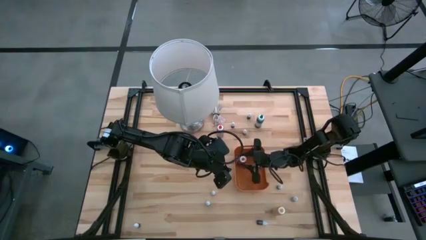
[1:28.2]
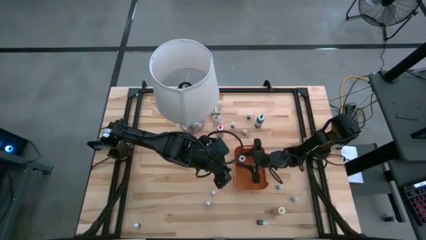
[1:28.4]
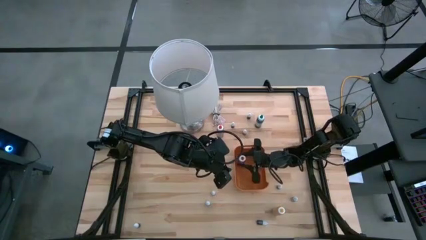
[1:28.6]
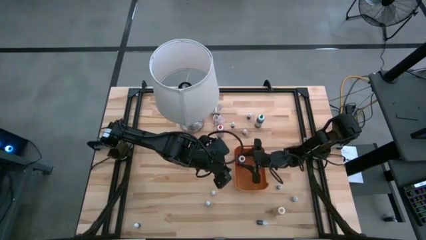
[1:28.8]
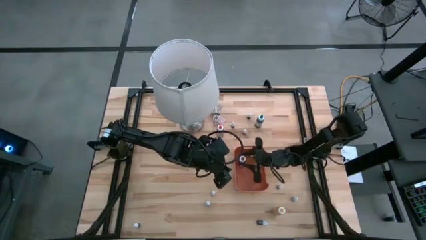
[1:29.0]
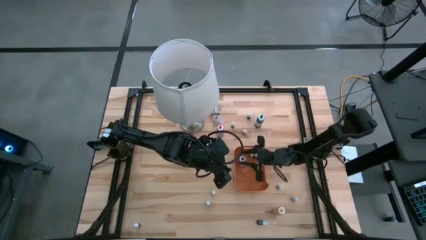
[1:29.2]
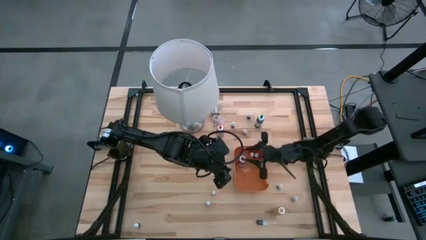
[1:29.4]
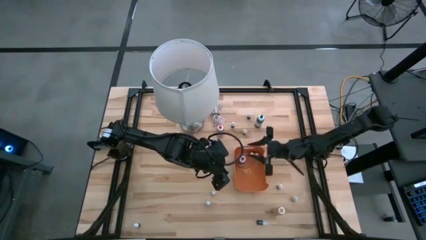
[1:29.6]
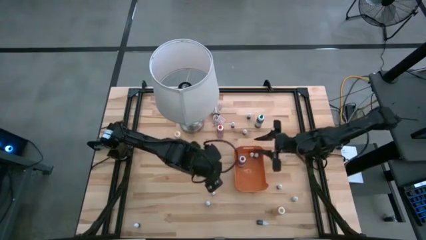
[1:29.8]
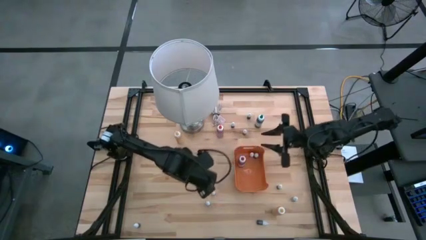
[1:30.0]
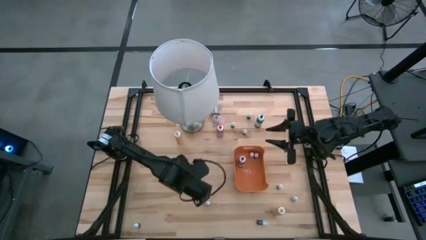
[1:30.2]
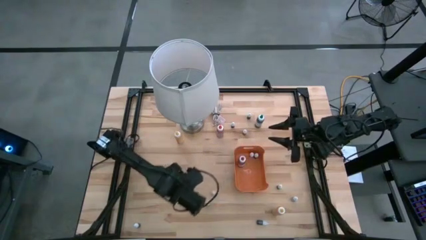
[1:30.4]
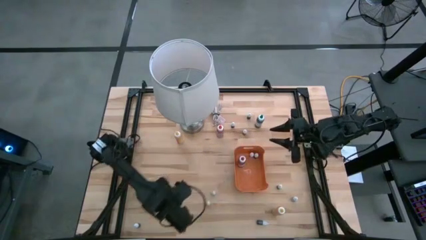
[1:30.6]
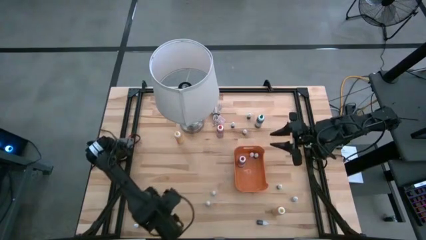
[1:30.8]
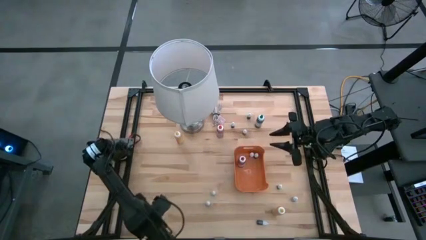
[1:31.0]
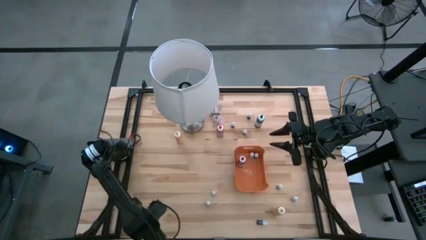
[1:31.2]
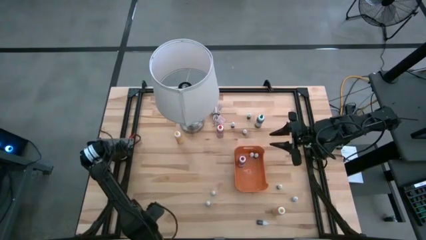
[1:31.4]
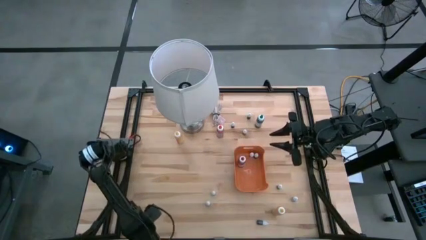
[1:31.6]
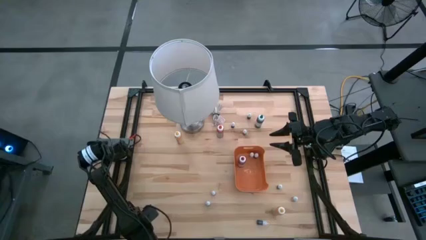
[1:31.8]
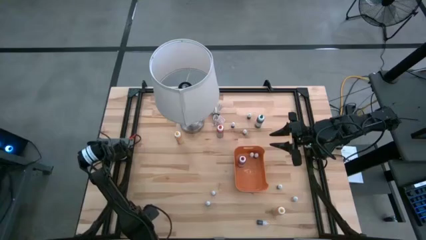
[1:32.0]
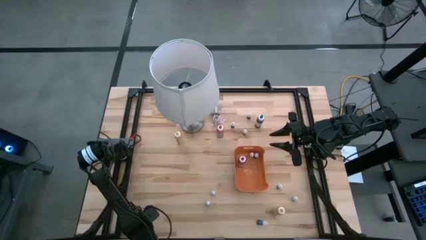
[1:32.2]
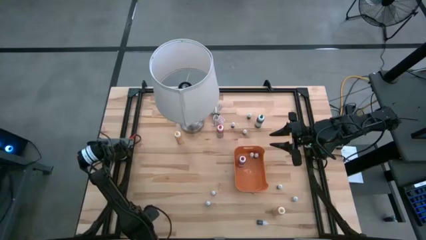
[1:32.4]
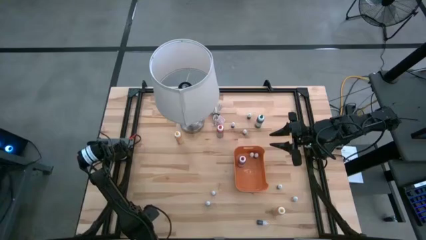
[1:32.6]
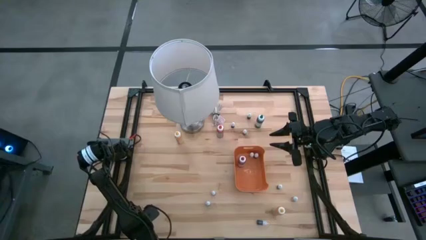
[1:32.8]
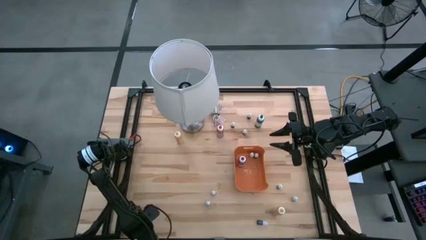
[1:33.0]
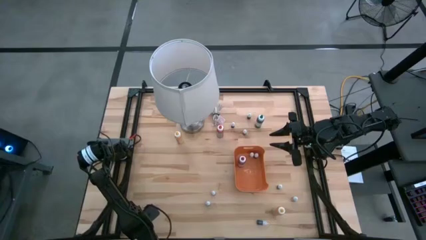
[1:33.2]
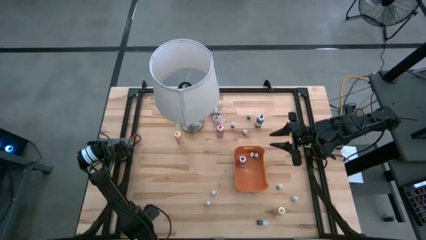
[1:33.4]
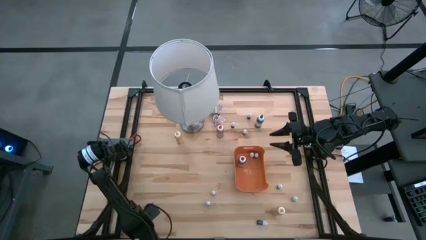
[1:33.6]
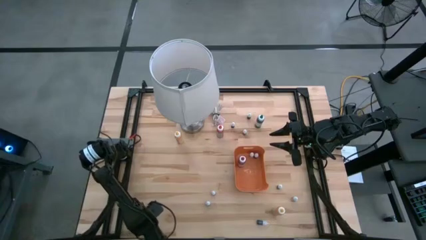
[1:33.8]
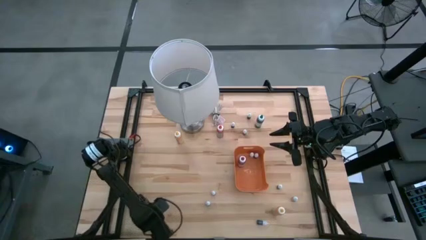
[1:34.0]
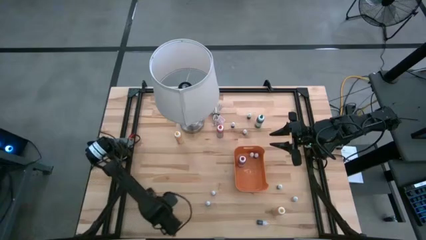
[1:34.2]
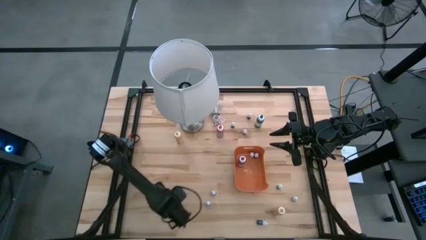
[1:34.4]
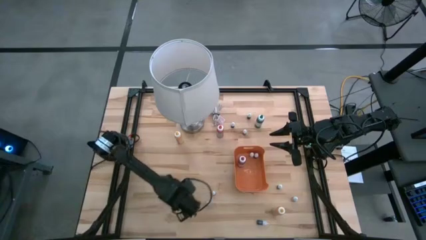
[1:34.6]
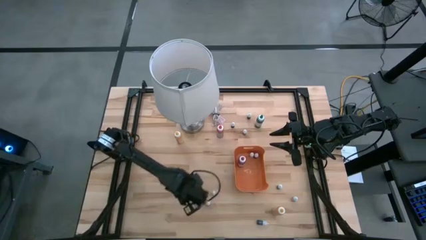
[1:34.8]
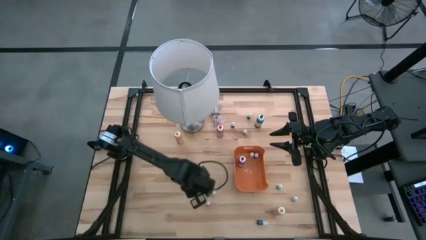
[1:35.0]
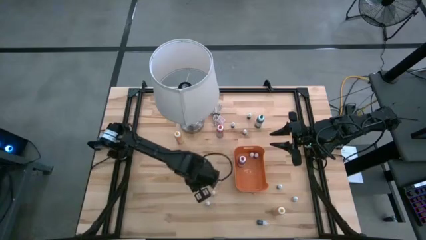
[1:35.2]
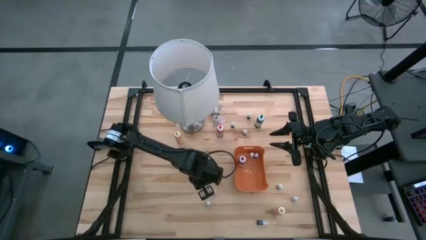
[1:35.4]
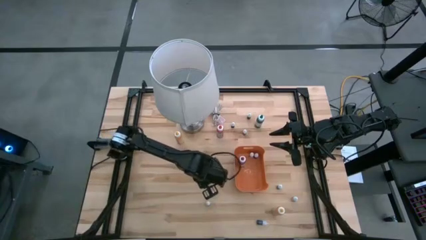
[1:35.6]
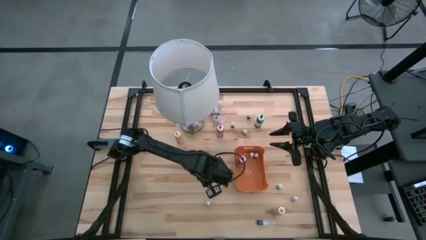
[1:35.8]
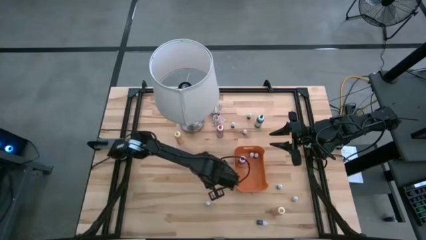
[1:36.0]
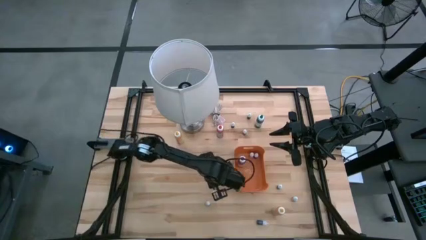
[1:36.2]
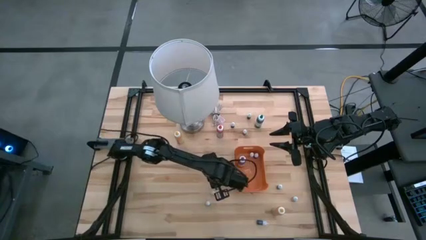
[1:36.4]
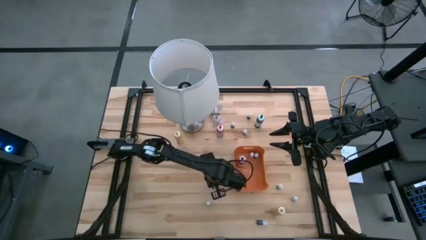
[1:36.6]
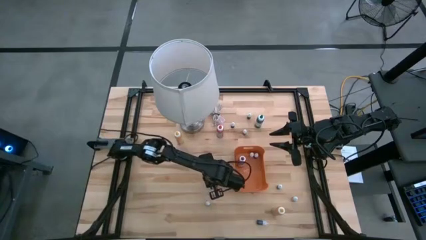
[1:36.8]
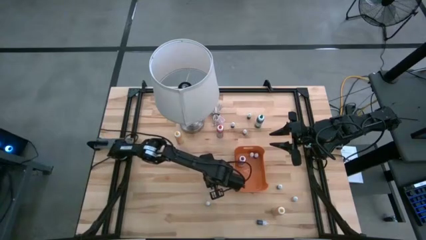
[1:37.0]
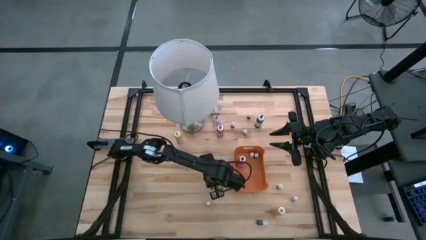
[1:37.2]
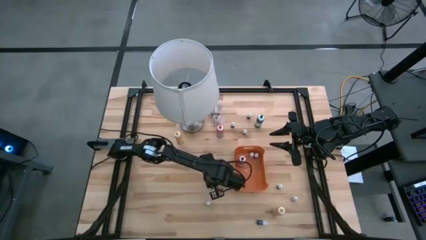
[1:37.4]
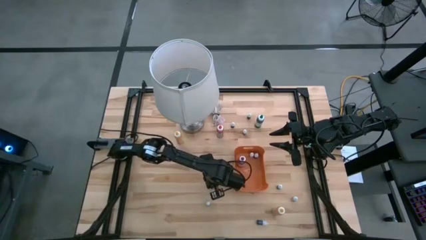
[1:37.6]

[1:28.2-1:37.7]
Task: Pick & Place food coloring
Move the small food coloring bottle from the left to the center of the table
